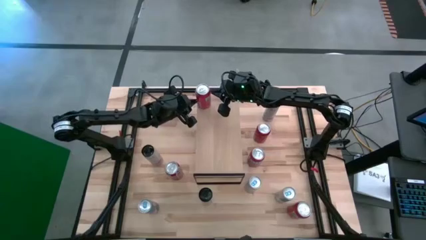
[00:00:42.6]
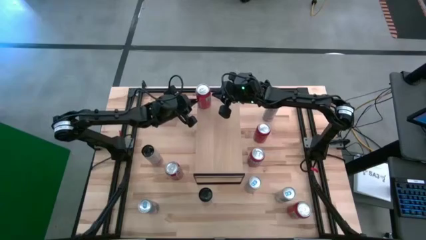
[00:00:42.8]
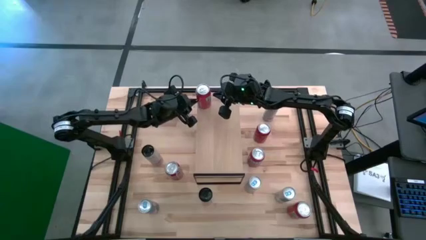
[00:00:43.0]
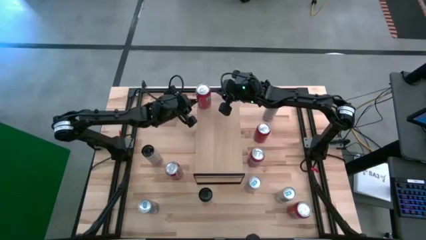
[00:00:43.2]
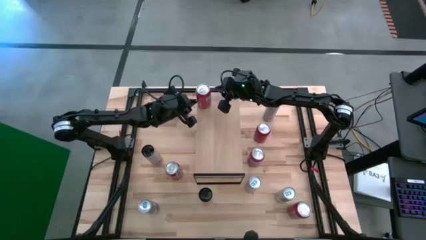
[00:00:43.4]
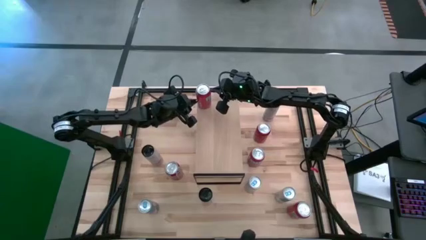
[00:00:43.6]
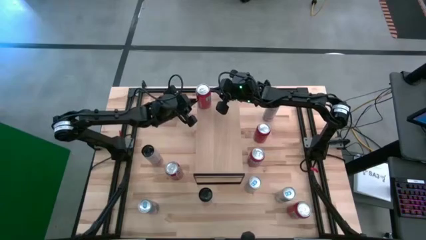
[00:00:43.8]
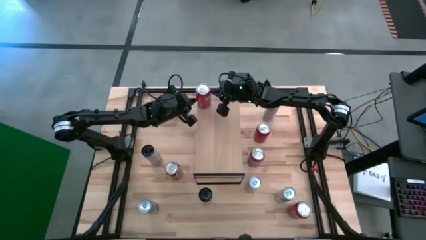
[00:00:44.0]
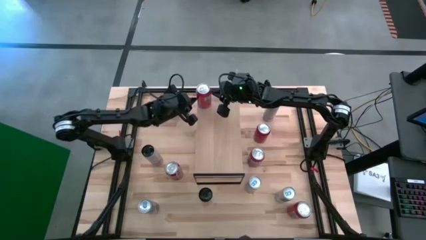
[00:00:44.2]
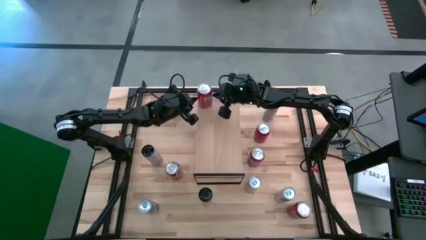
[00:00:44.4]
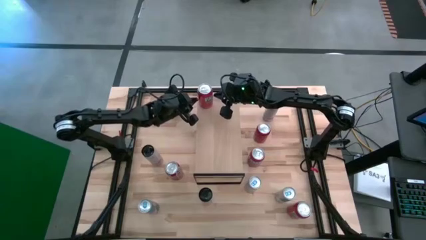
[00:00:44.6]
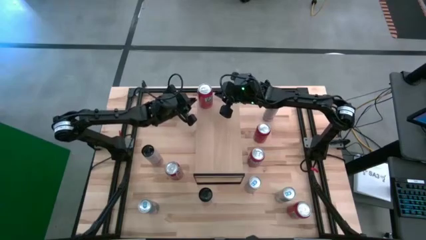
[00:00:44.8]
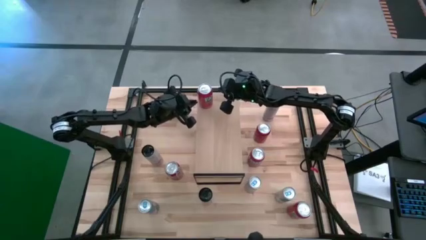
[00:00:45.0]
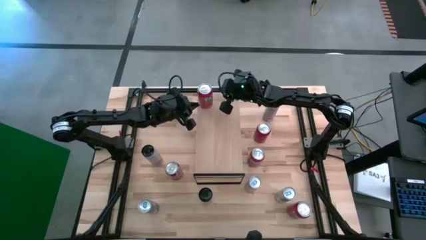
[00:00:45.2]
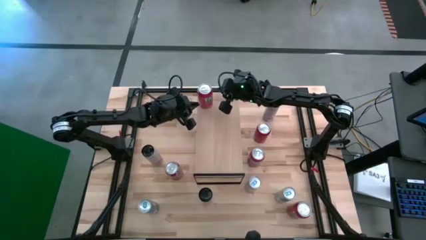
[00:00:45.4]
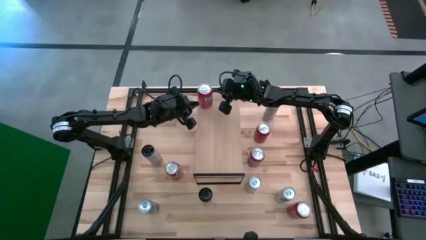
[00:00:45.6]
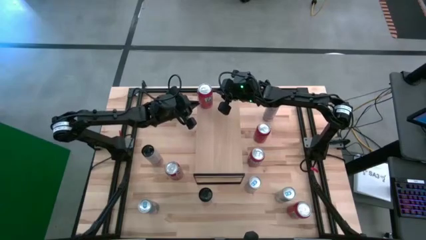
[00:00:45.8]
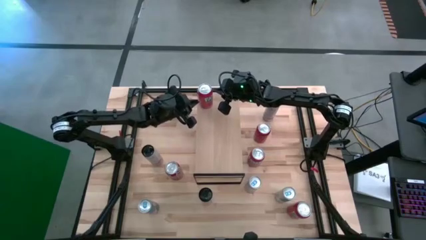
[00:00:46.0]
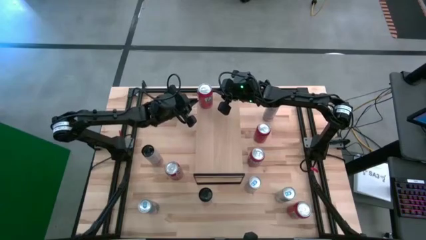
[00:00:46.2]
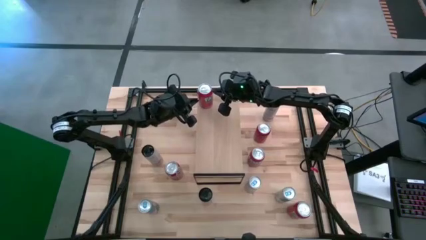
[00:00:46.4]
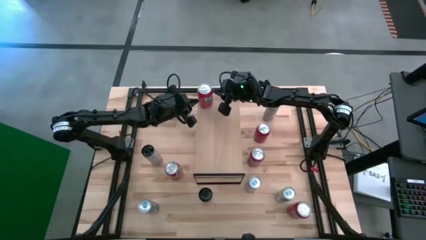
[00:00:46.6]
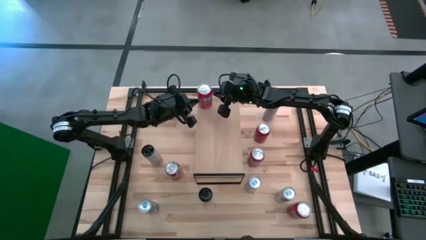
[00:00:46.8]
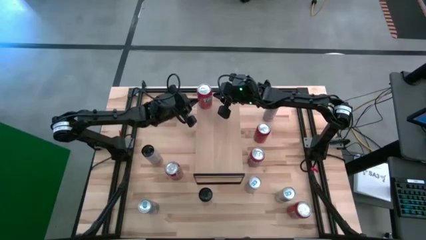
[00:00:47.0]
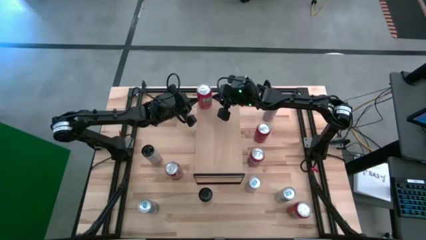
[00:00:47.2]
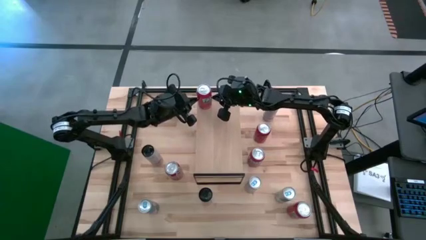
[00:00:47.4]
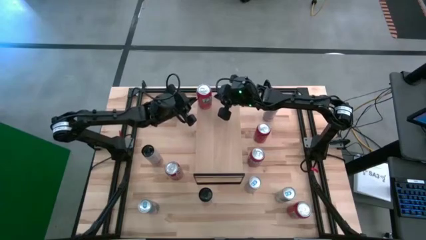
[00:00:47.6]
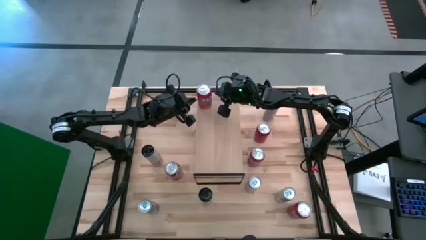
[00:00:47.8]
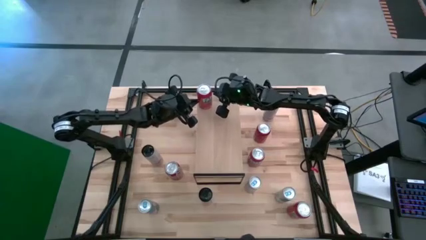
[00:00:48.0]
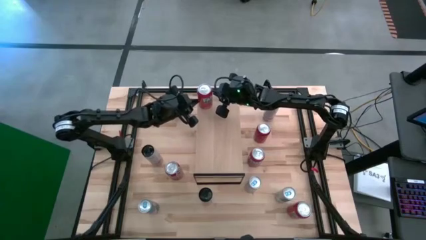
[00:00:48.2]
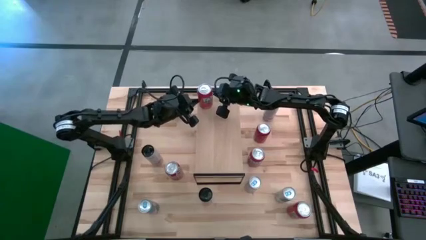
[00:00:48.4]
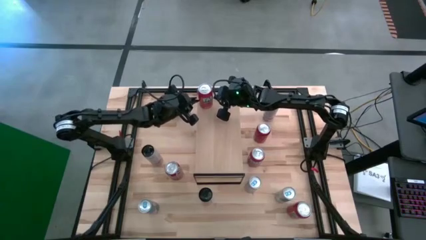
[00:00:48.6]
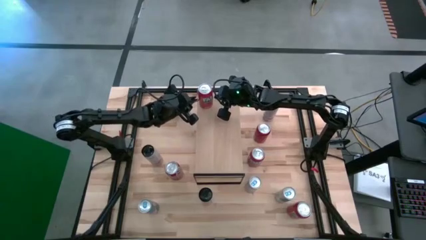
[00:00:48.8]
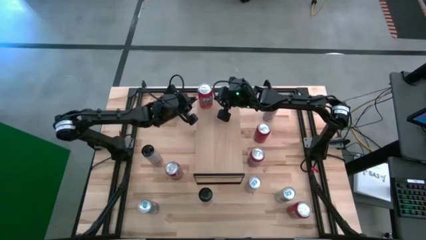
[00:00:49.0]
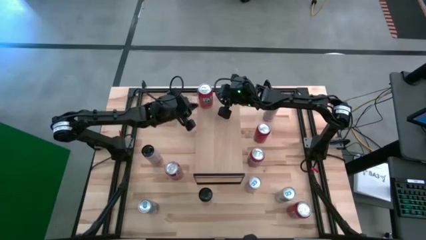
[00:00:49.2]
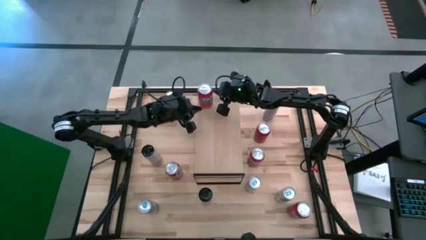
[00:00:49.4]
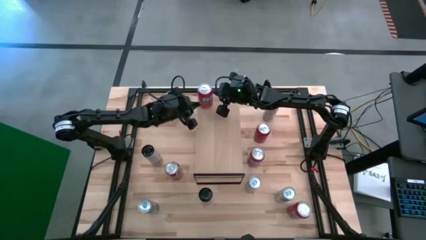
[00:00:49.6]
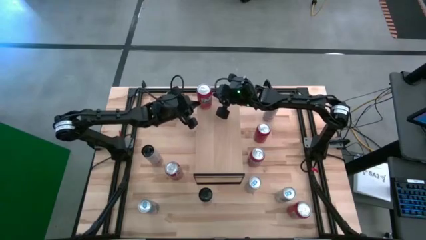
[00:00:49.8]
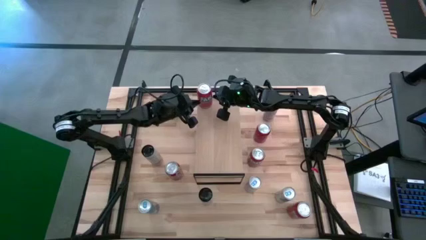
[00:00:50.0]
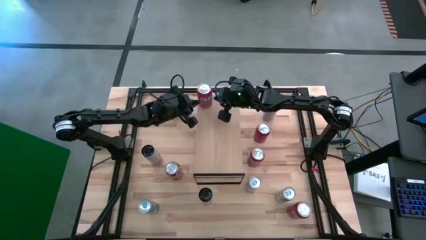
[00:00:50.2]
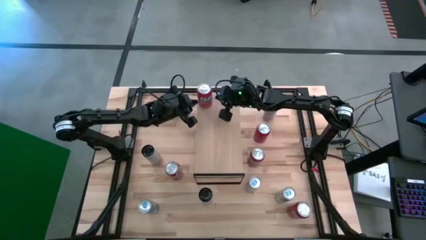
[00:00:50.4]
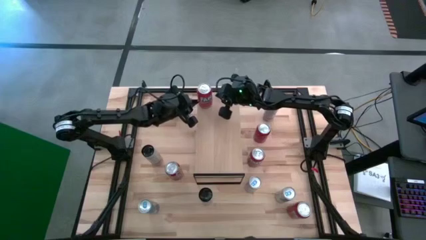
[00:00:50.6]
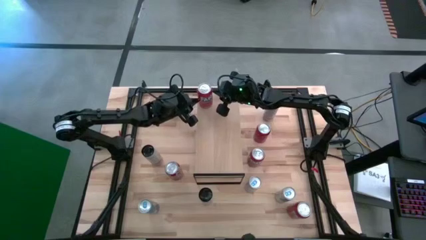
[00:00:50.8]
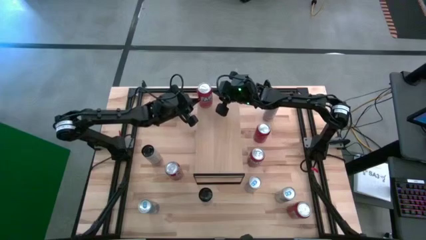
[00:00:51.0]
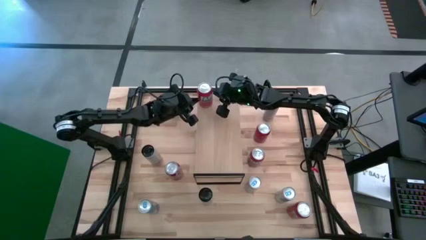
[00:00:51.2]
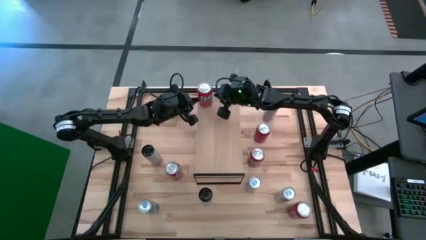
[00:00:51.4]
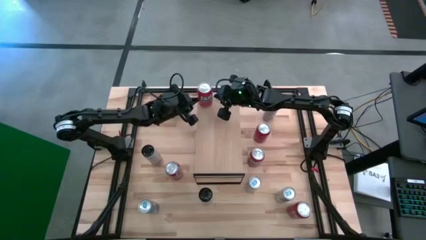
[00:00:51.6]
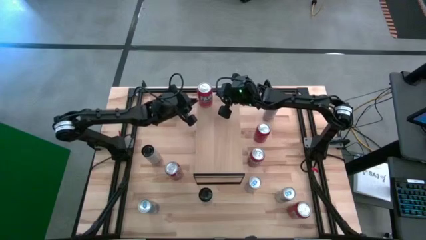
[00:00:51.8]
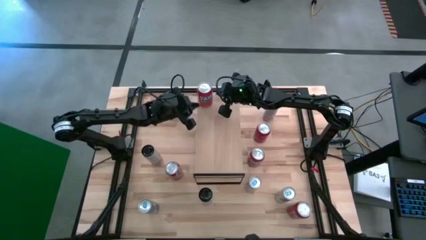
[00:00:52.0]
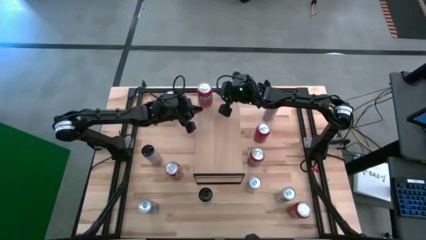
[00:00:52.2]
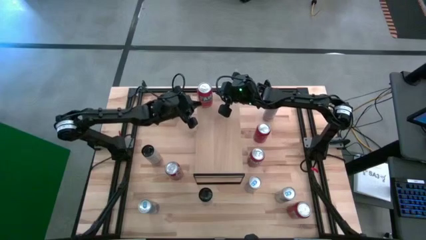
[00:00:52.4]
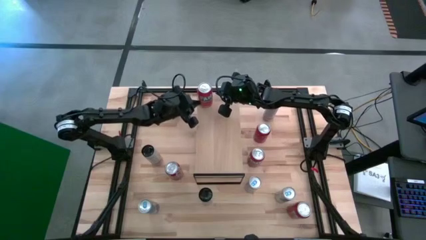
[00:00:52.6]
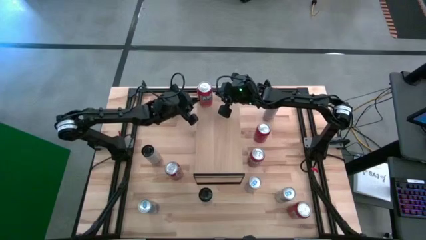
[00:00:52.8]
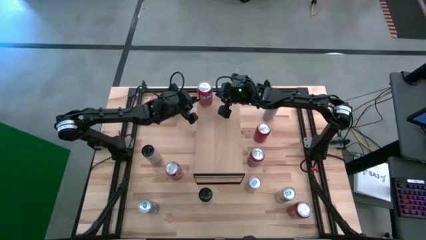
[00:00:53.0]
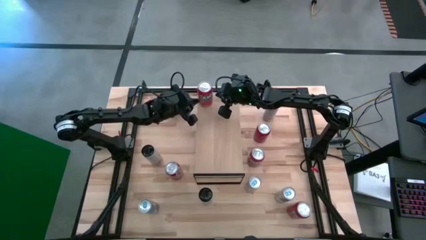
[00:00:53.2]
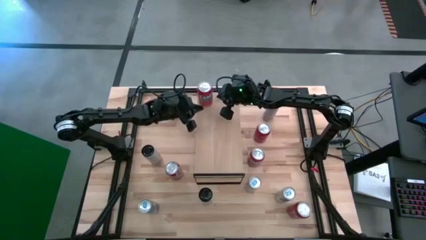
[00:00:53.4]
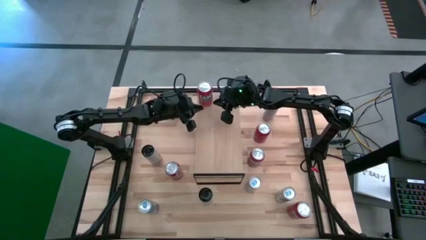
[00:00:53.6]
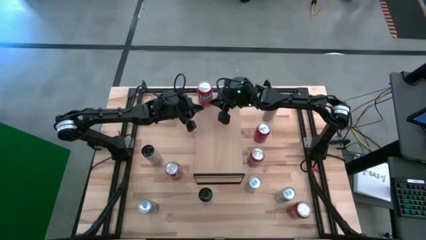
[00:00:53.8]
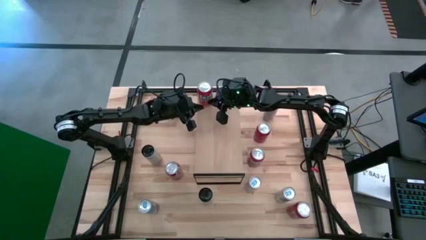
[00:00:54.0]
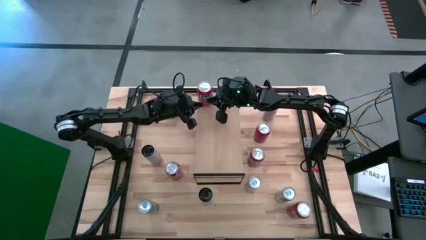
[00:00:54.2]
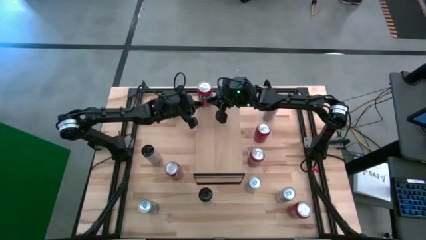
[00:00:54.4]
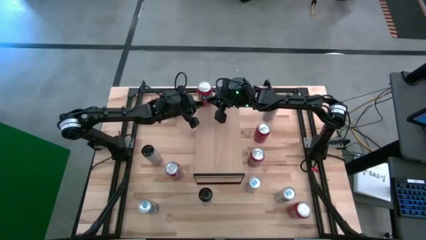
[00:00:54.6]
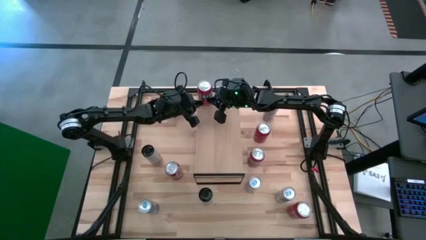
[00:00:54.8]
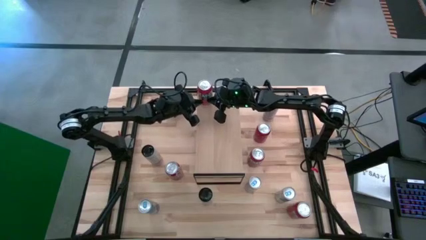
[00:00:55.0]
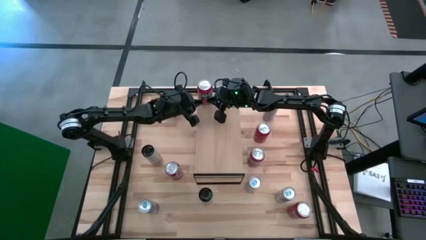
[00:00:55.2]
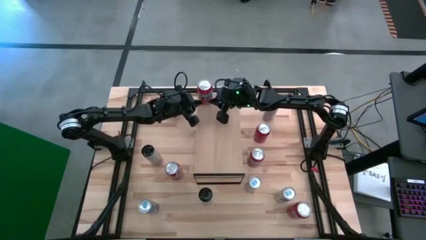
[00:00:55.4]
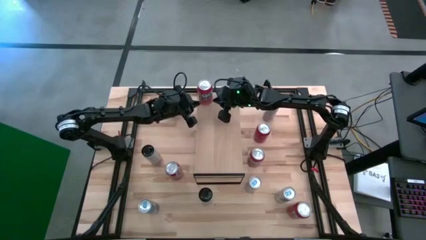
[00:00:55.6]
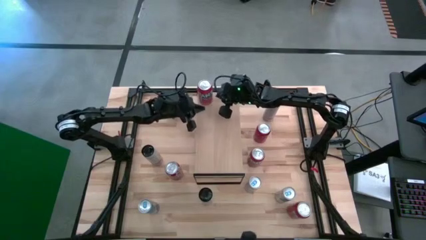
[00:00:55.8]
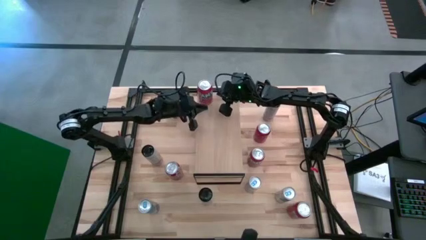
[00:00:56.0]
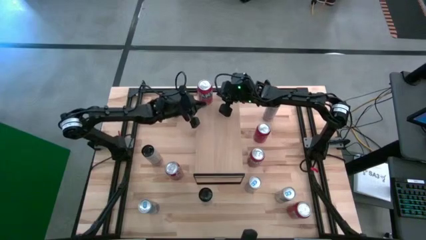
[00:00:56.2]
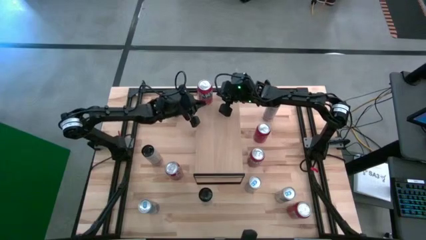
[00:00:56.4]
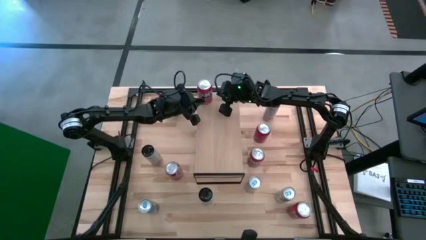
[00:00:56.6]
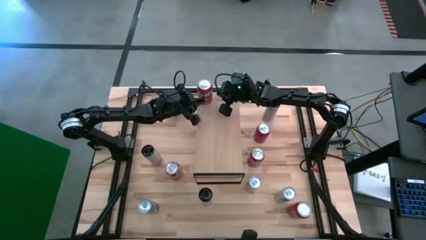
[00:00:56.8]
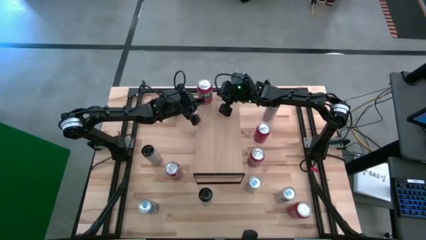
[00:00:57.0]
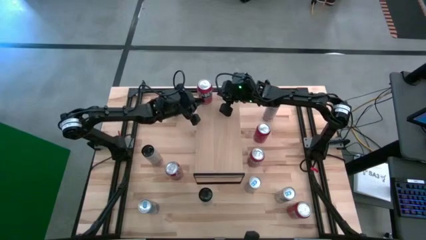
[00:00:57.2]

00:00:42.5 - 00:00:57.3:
Task: Place canned beverage on shelf
Put the top left orange soda can on the shelf
